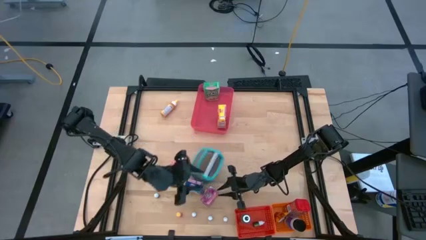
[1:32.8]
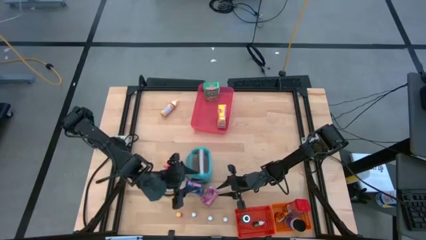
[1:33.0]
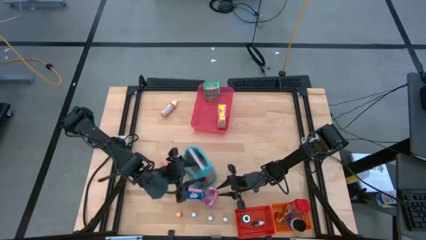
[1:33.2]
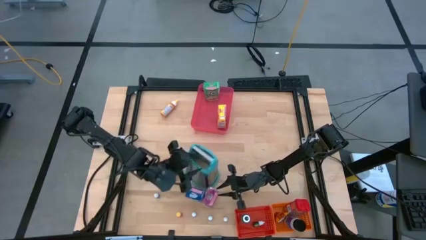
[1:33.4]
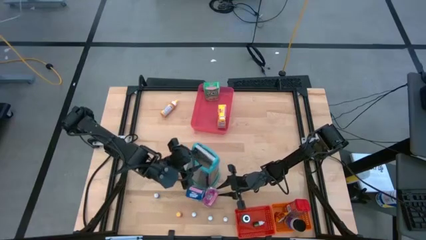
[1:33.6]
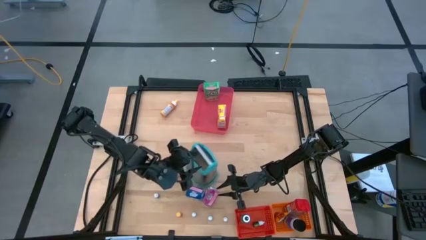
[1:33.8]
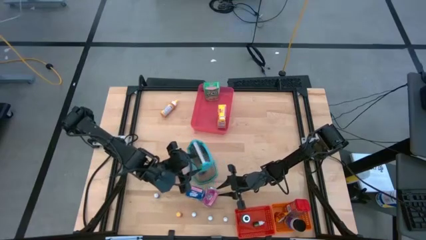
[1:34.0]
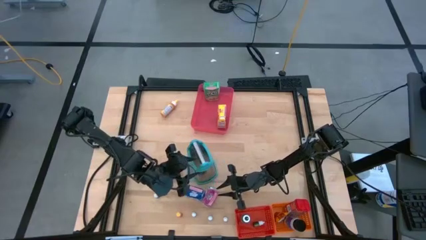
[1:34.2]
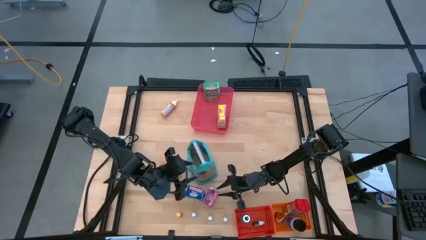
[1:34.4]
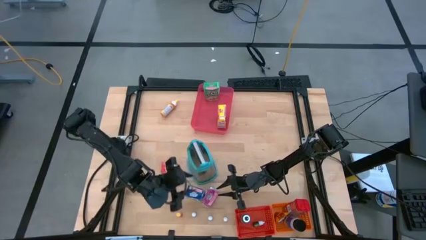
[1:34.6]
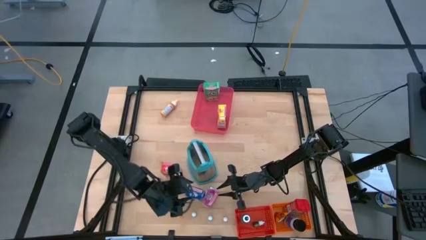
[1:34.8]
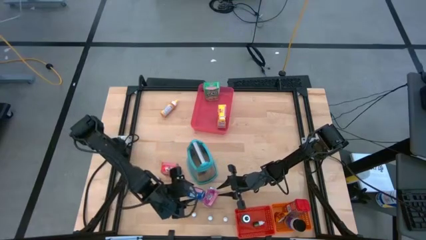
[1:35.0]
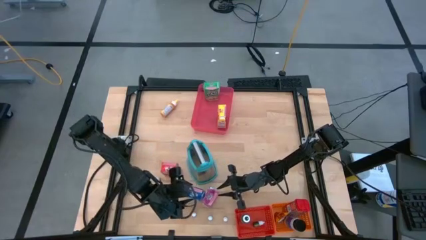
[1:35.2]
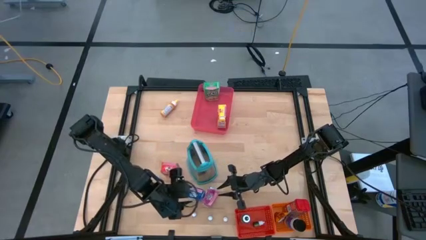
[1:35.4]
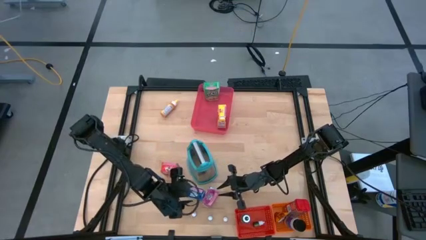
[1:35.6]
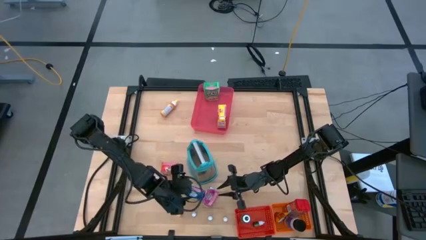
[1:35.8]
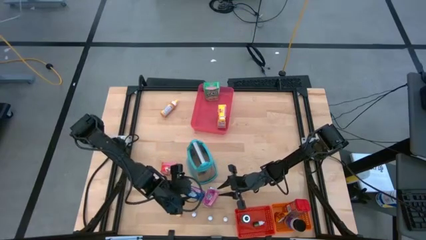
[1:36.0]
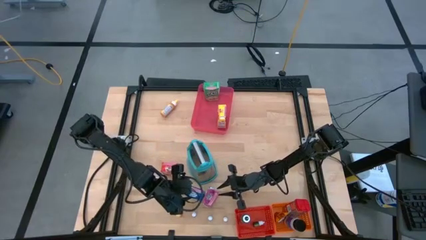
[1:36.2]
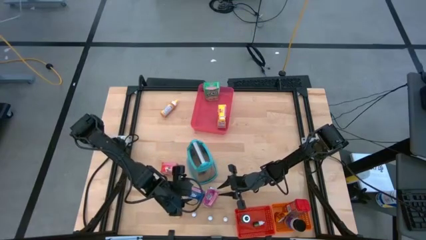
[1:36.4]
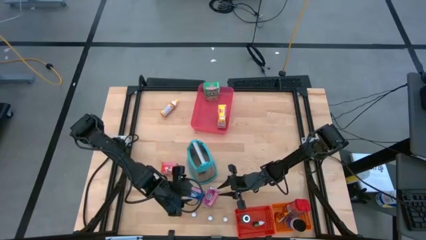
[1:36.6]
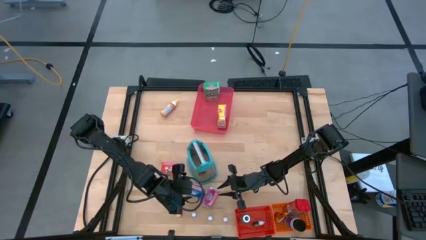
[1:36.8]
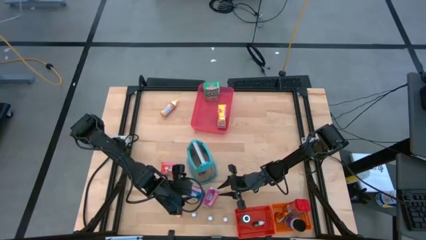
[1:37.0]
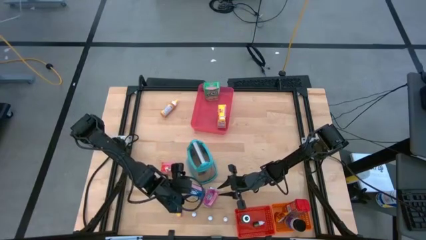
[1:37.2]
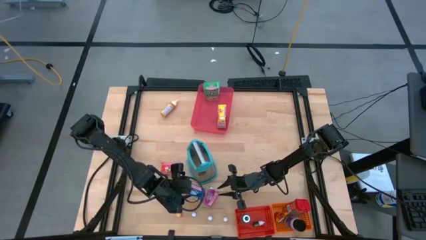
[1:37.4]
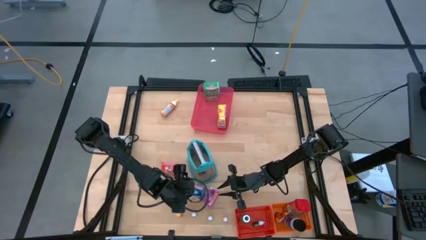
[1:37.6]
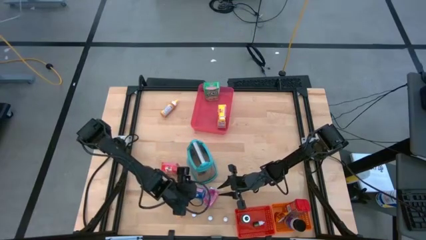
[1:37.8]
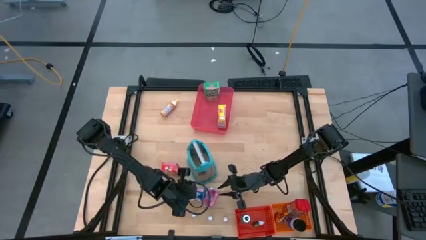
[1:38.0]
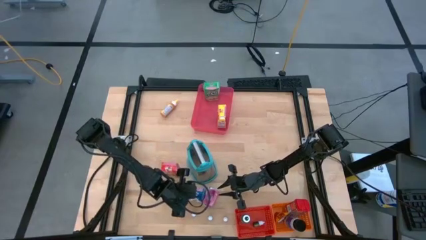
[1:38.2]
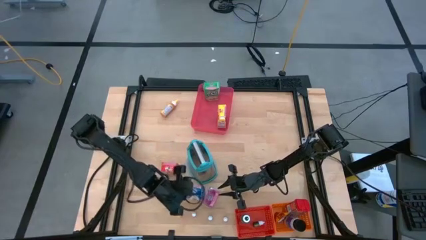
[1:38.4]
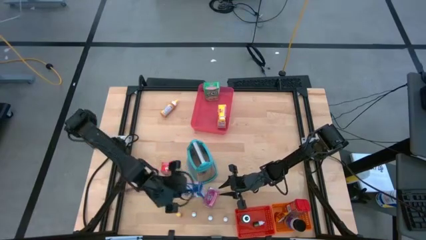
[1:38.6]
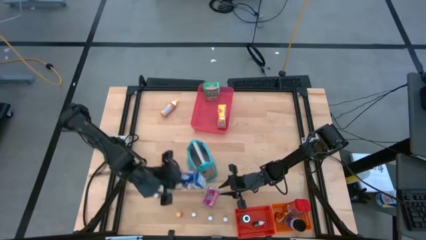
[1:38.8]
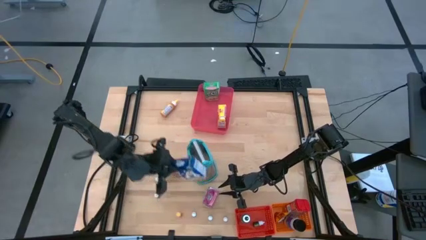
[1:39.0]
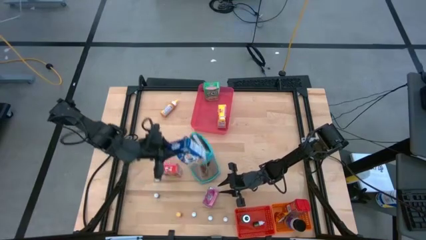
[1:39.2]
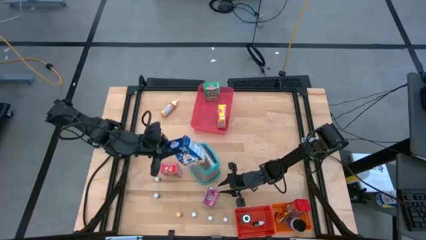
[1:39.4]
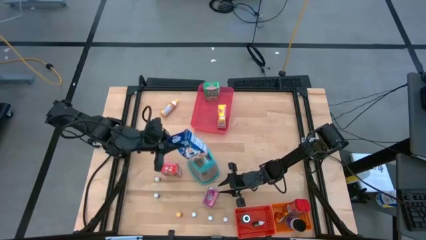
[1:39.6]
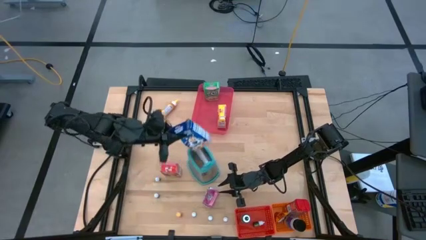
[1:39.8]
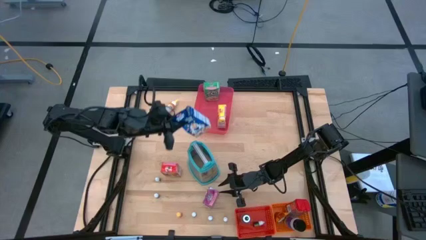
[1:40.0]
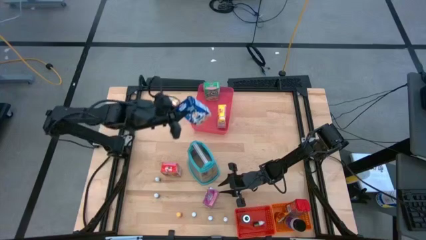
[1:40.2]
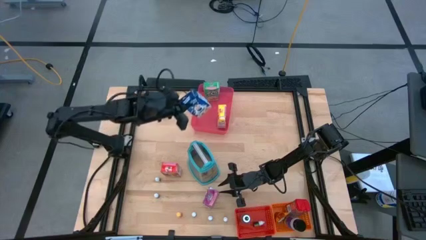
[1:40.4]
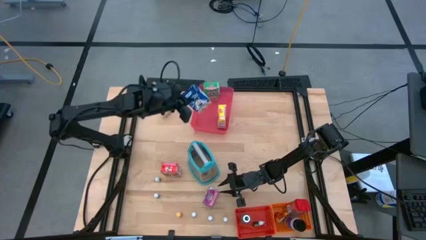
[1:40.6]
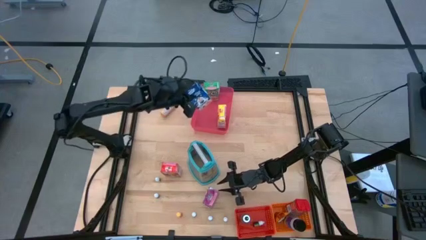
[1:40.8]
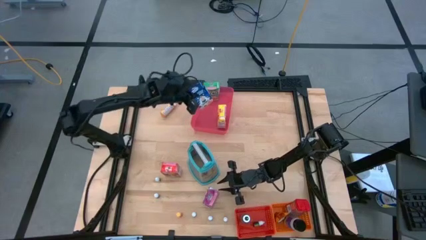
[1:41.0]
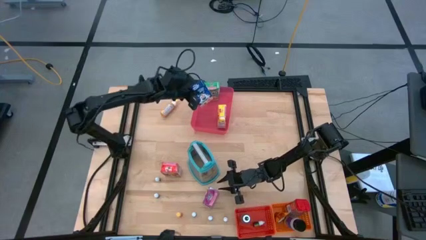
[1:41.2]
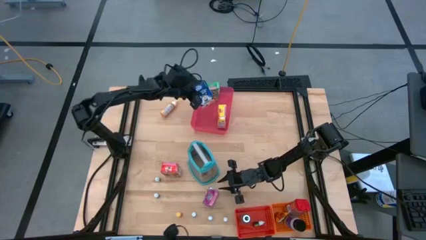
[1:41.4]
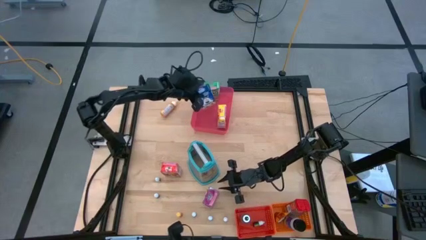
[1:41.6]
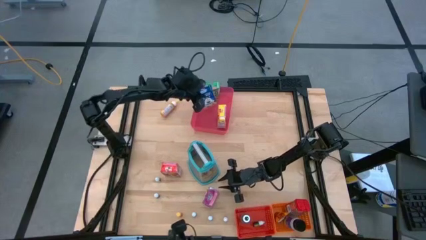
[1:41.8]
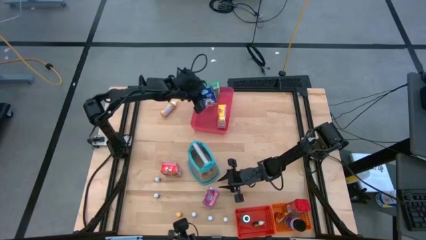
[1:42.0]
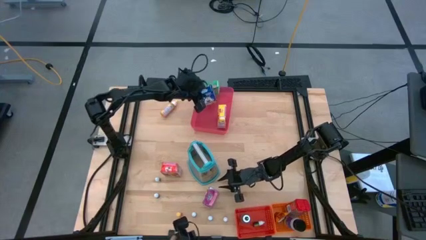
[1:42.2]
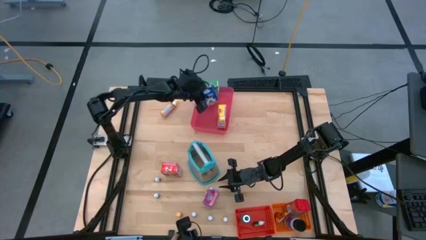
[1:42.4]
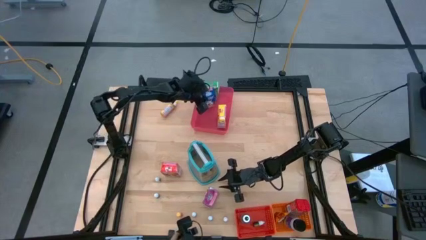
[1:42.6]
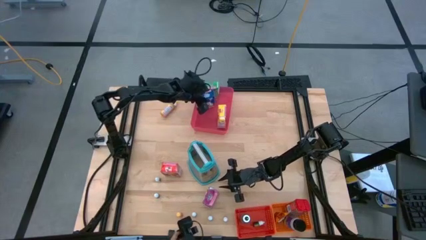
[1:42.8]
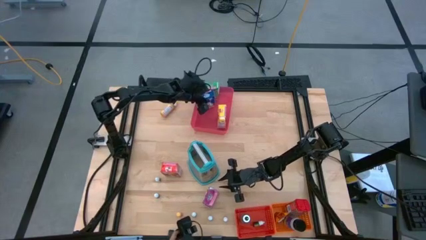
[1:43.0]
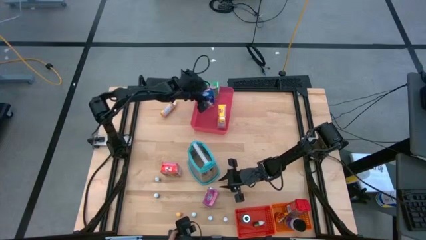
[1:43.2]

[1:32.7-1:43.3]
Task: Pick & Place Kitchen Items
Put the blue cereal box into the pink bin
